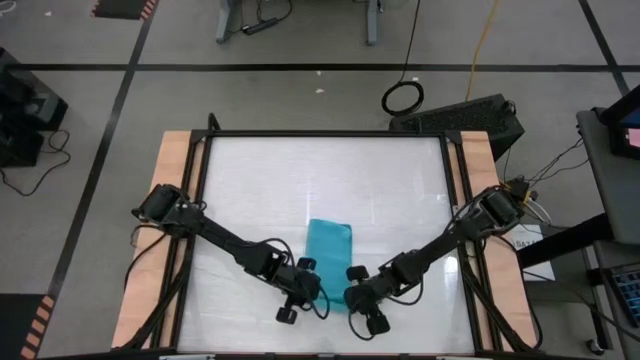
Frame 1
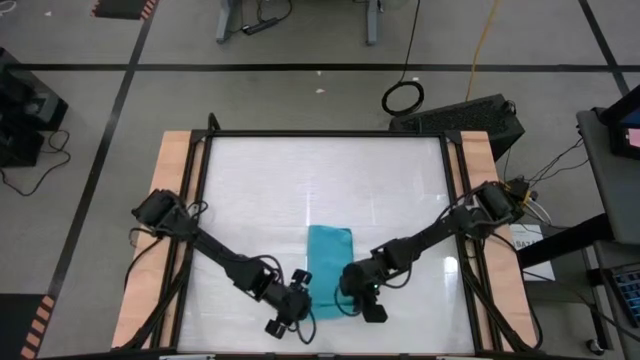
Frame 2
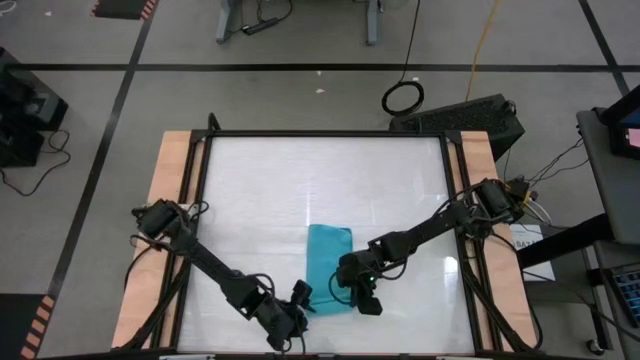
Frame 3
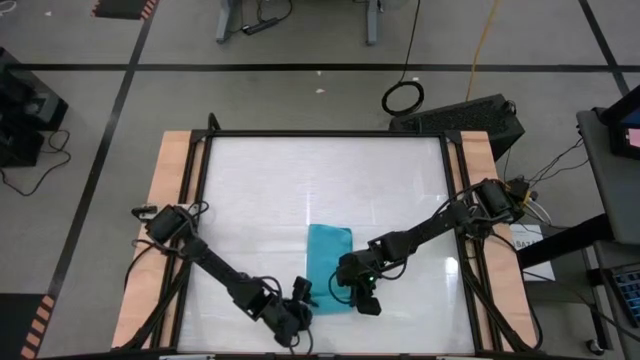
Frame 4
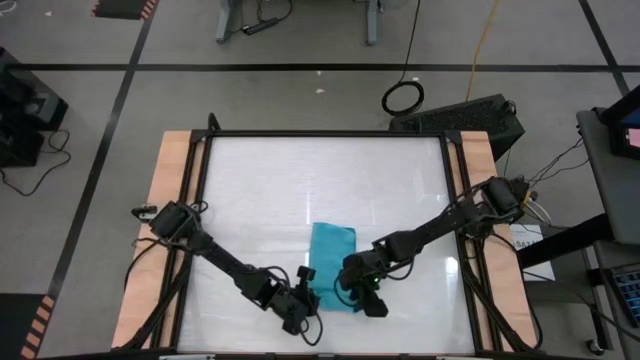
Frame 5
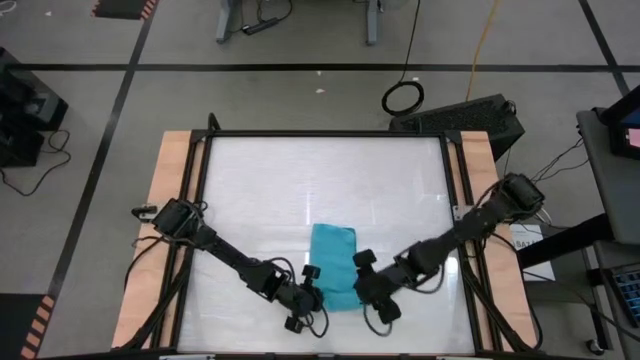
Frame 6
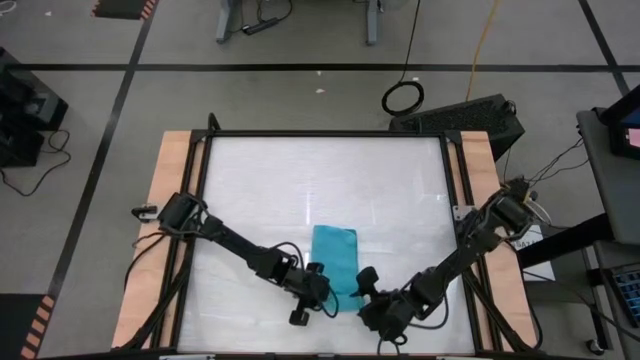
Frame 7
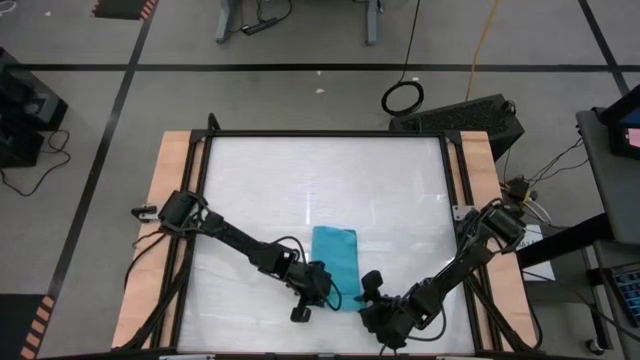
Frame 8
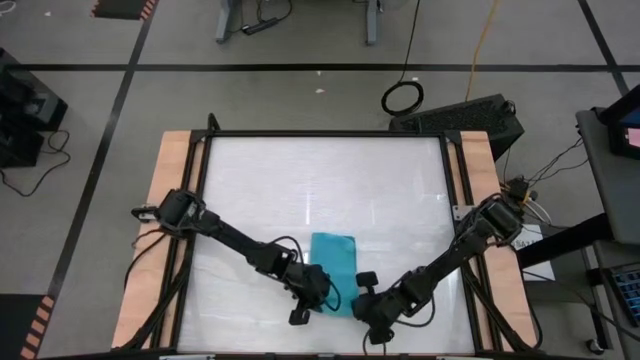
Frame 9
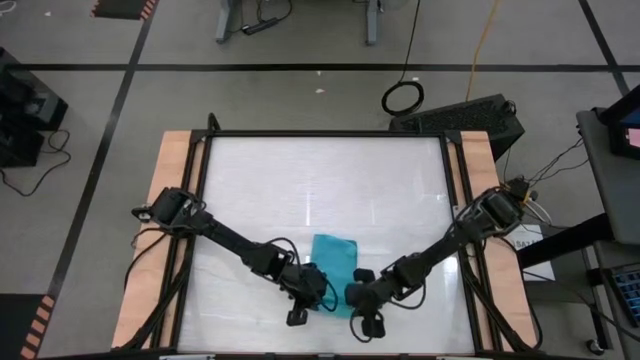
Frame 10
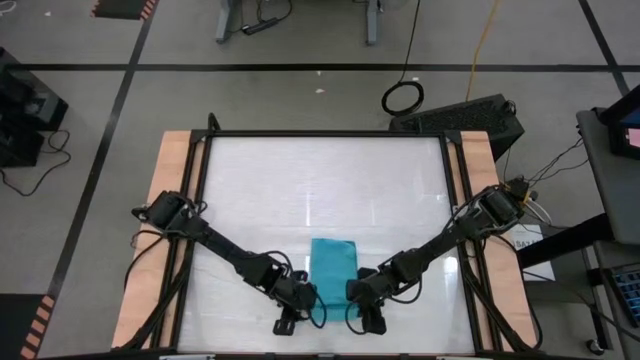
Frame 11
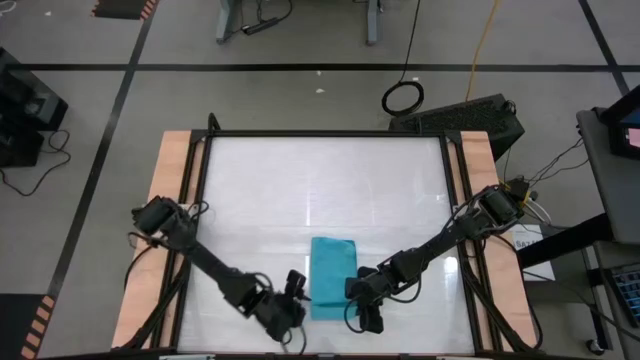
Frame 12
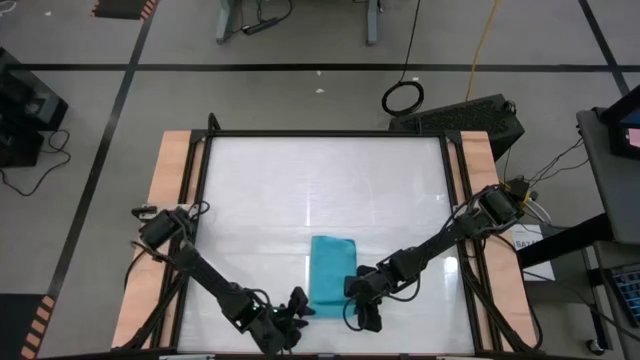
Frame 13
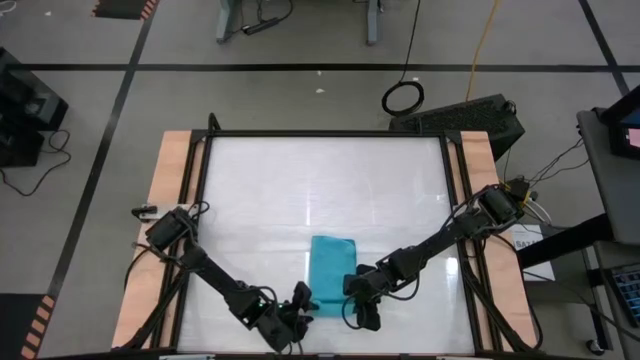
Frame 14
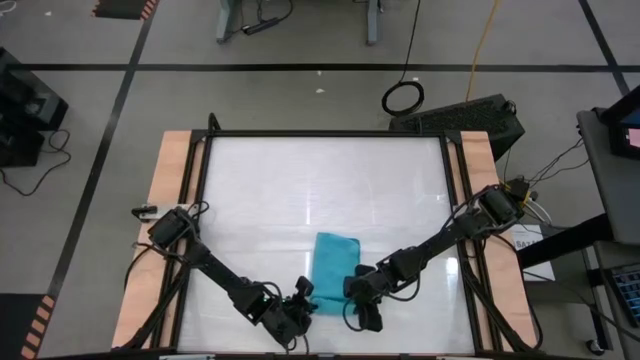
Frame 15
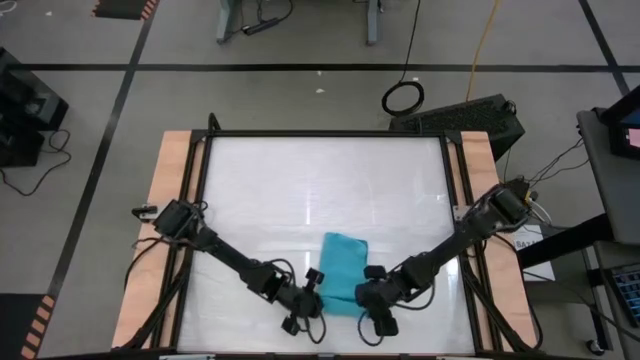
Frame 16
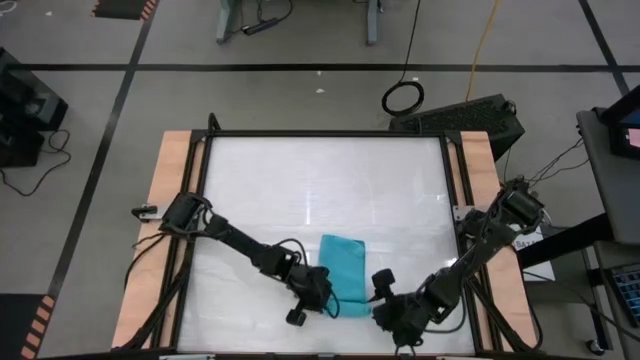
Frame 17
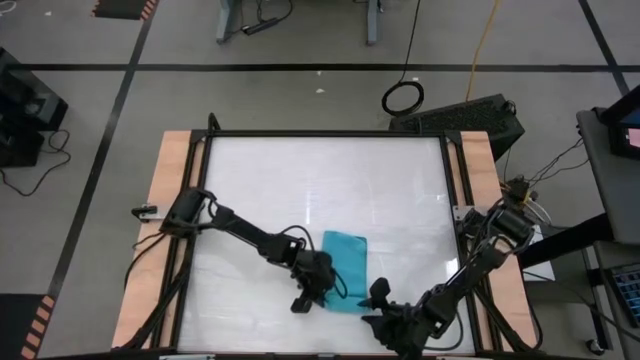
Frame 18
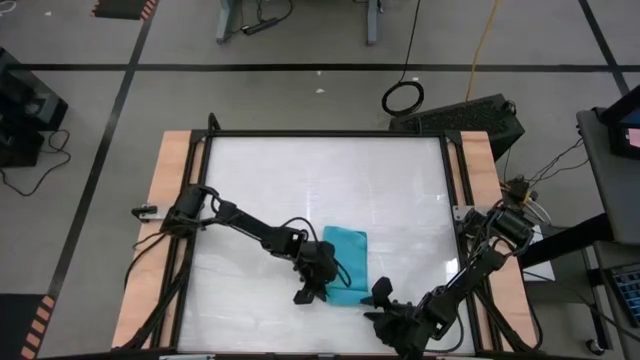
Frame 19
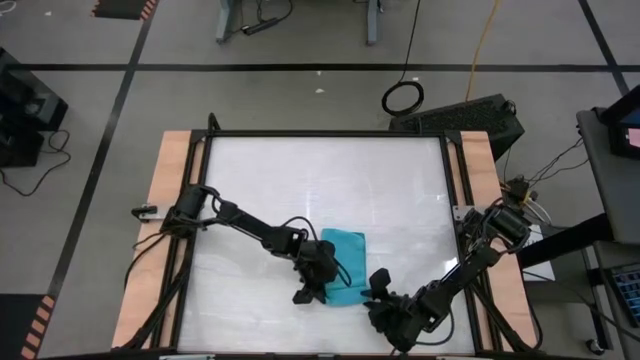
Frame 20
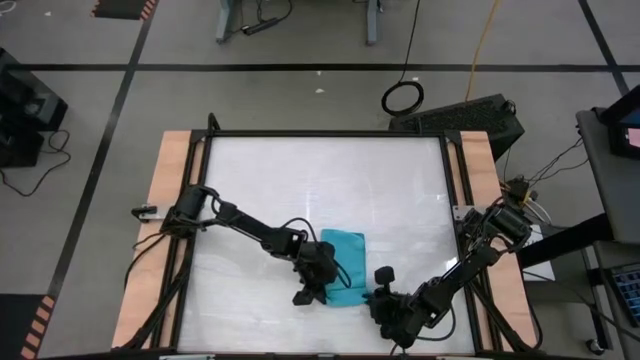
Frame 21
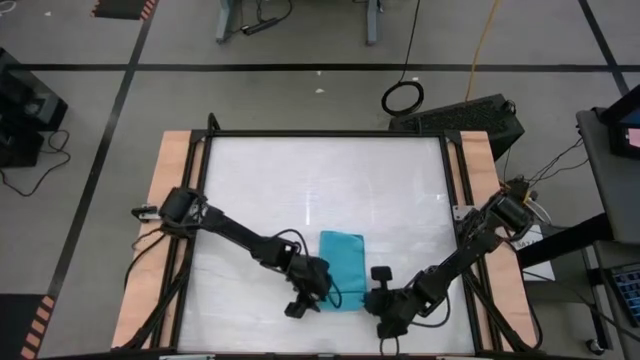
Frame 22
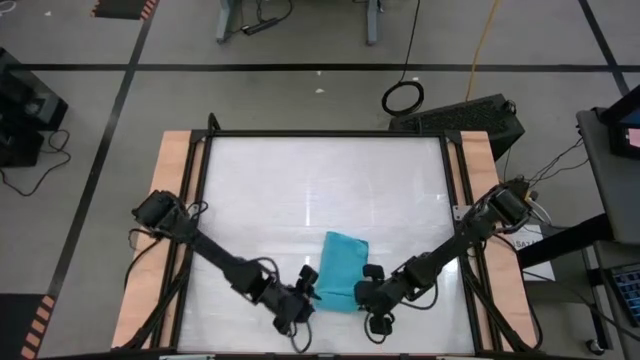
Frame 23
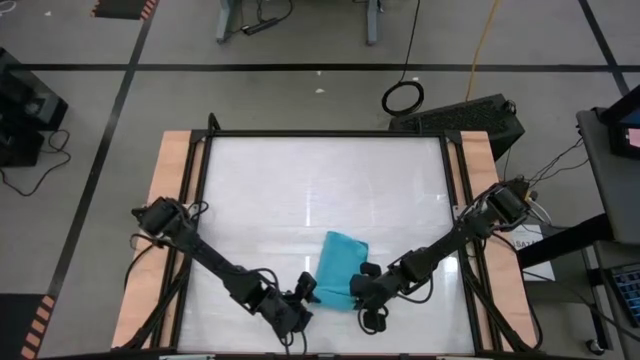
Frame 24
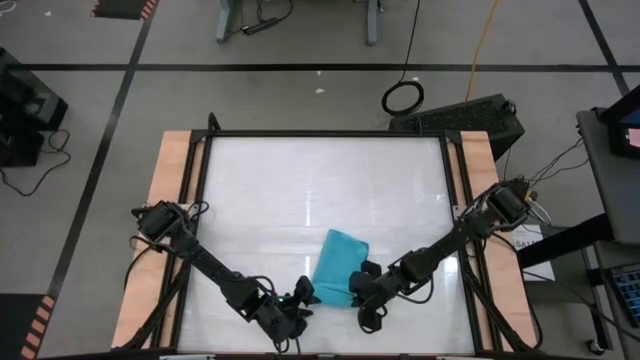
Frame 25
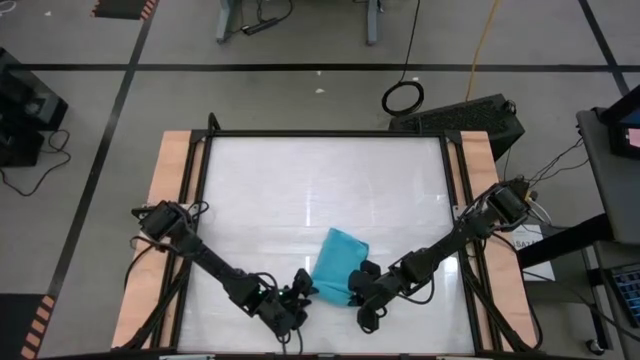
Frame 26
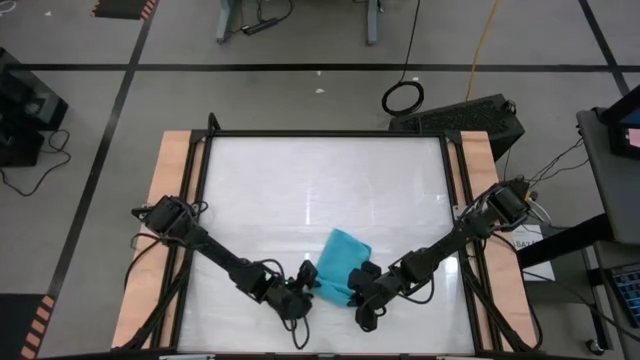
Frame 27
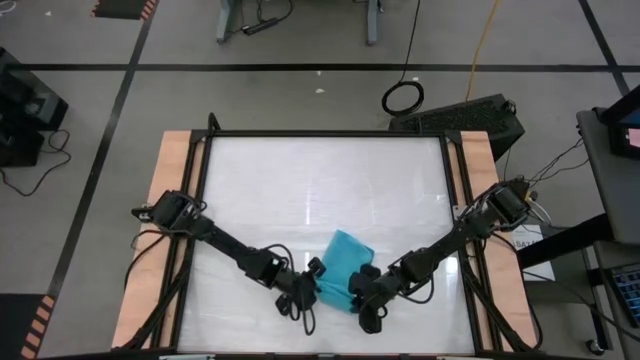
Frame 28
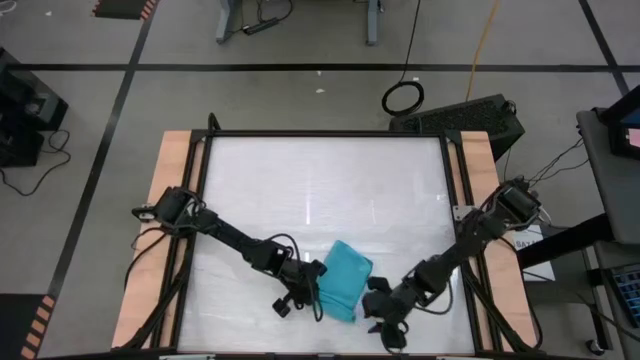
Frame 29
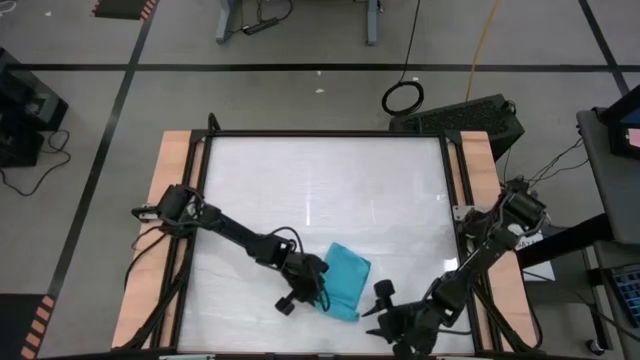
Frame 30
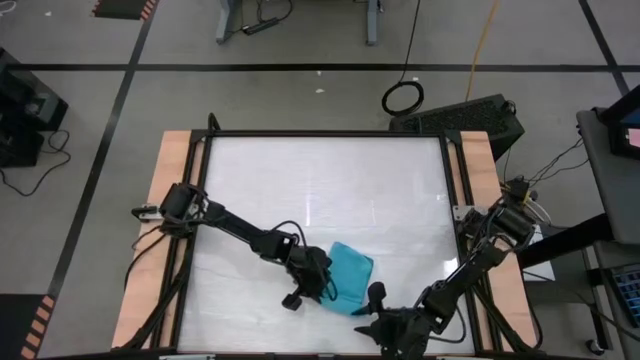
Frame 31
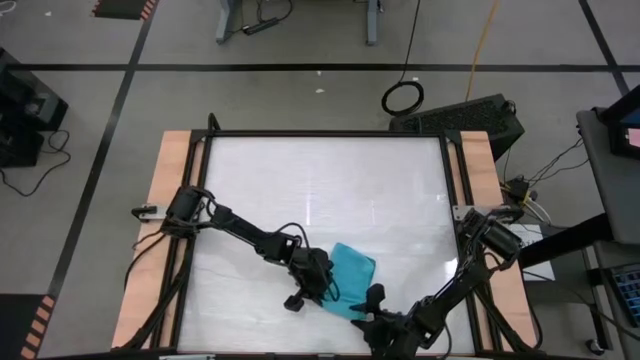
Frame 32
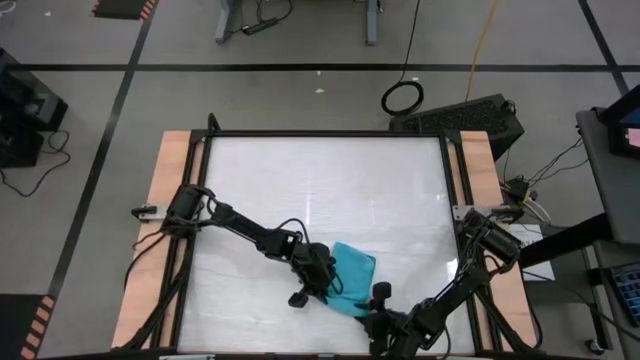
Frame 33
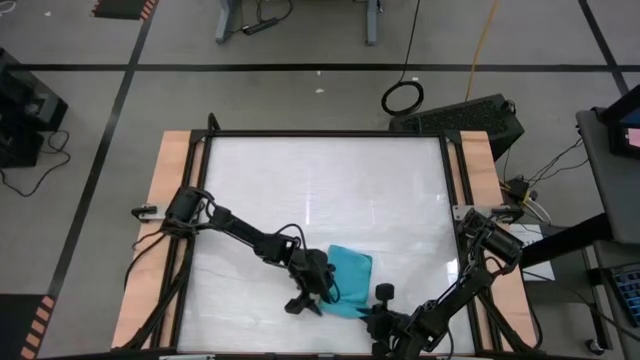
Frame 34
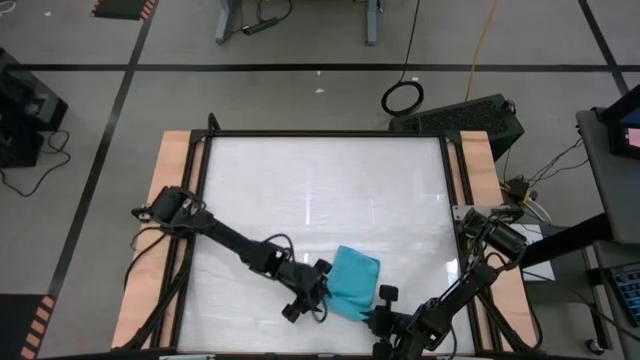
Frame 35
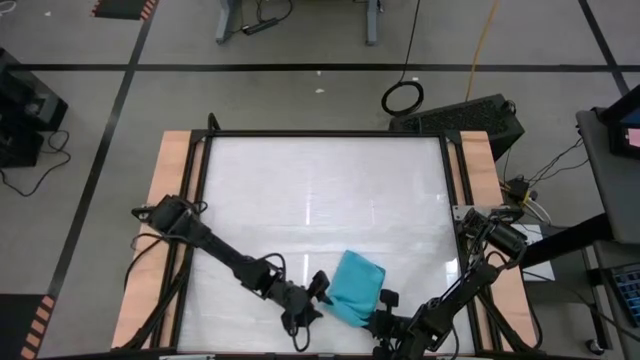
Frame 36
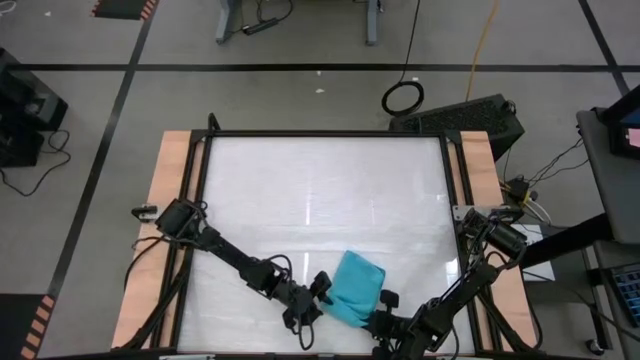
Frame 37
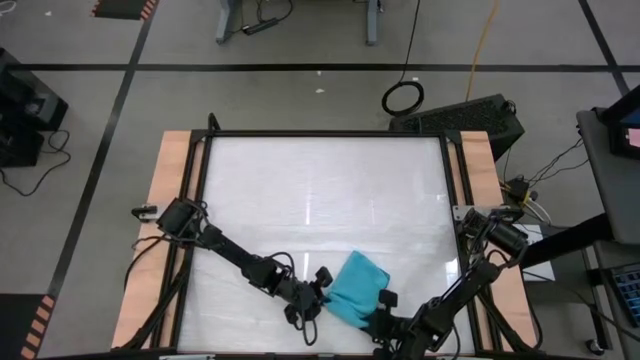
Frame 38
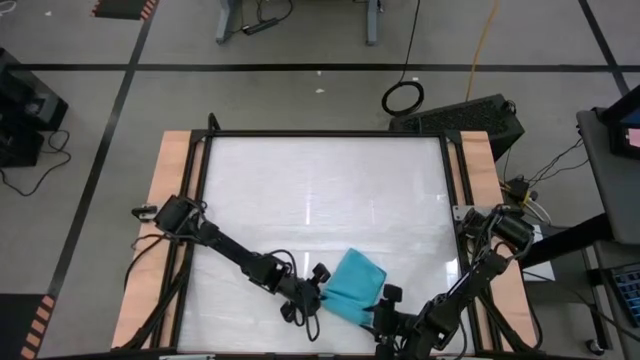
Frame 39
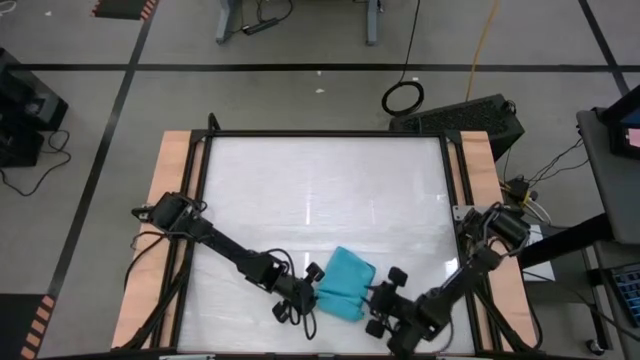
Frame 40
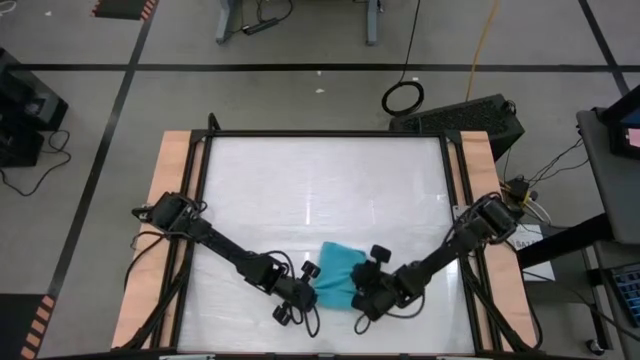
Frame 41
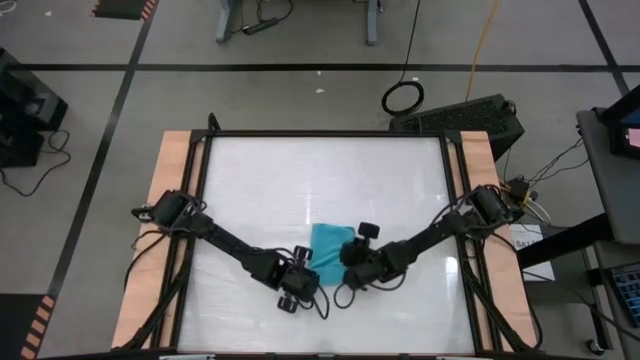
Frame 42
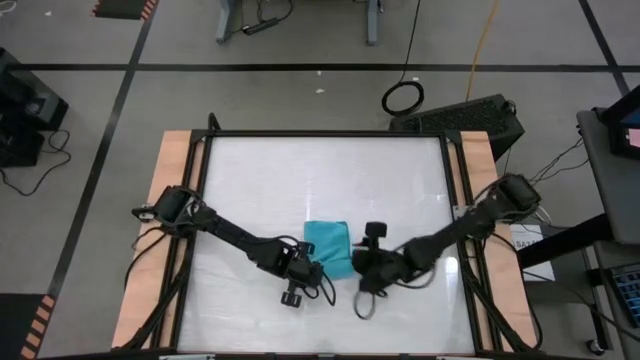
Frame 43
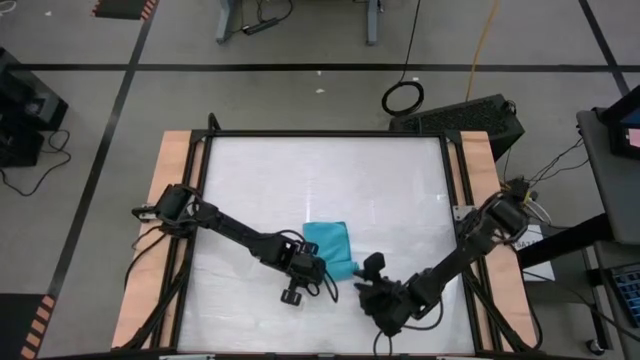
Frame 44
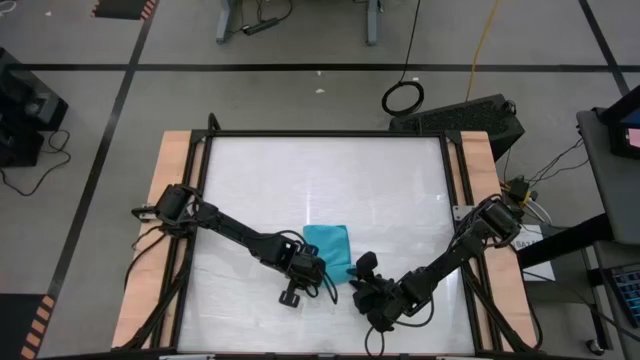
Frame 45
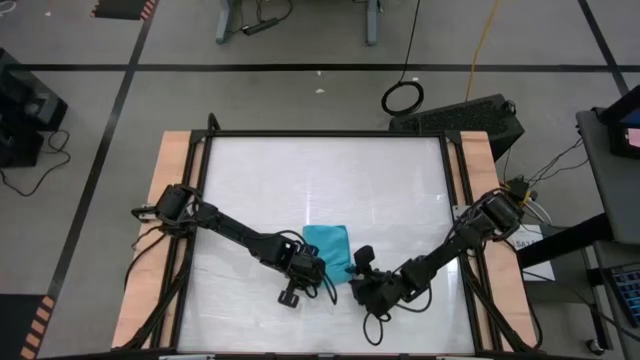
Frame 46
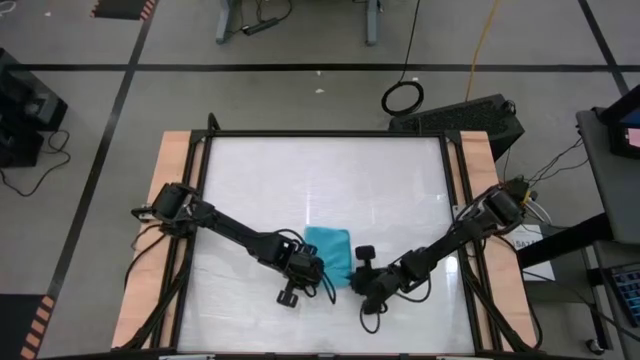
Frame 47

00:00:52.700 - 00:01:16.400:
Task: Roll towel into tight, uniform cylinder
Roll the blue microfiber towel
